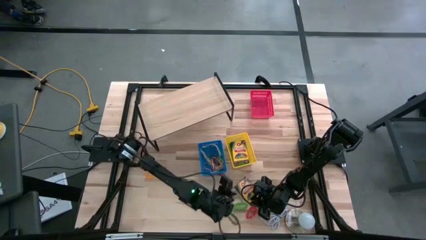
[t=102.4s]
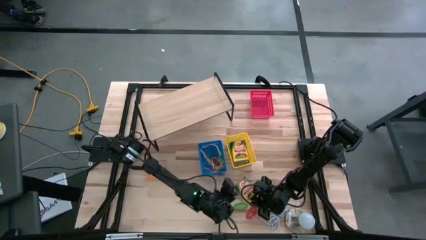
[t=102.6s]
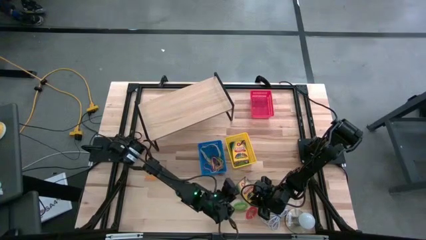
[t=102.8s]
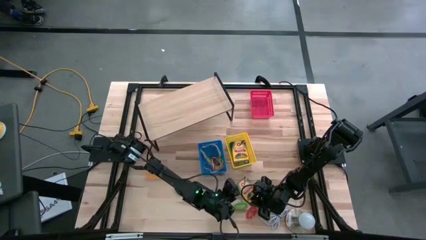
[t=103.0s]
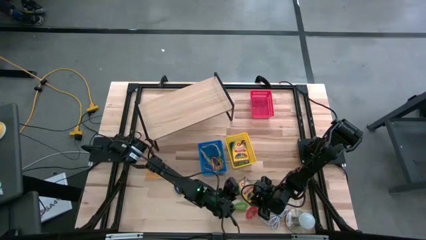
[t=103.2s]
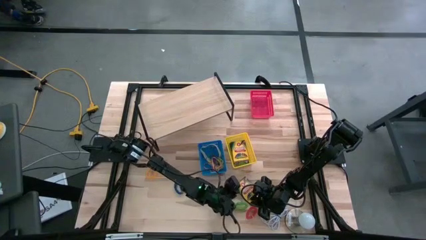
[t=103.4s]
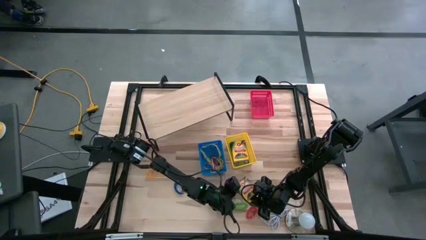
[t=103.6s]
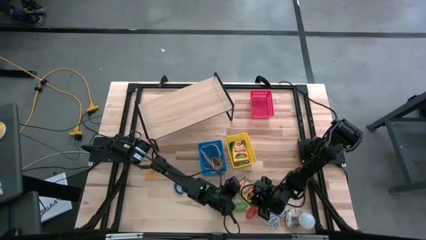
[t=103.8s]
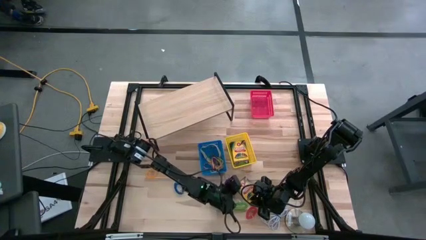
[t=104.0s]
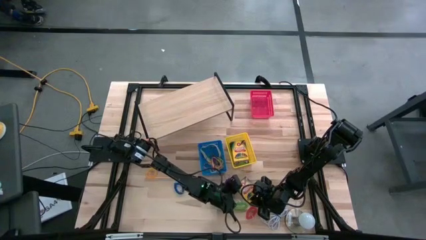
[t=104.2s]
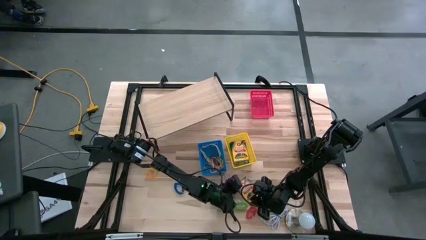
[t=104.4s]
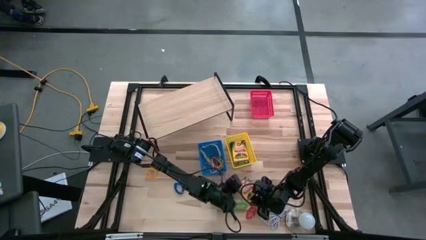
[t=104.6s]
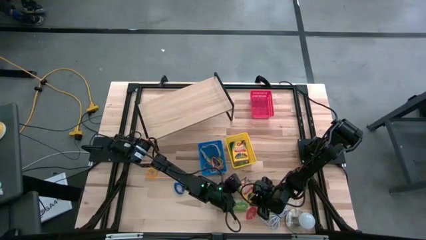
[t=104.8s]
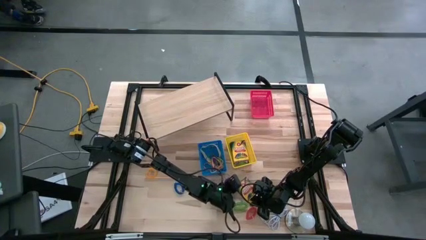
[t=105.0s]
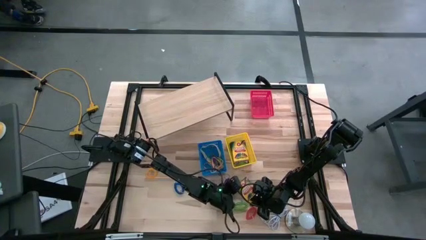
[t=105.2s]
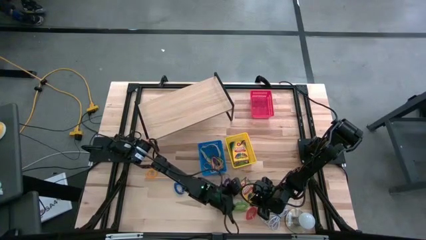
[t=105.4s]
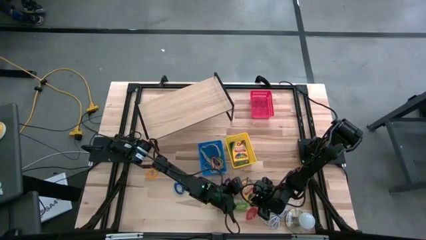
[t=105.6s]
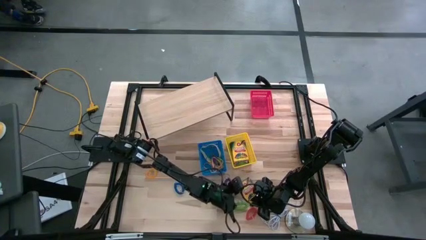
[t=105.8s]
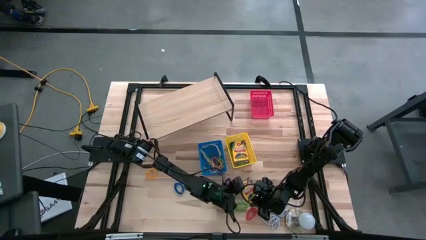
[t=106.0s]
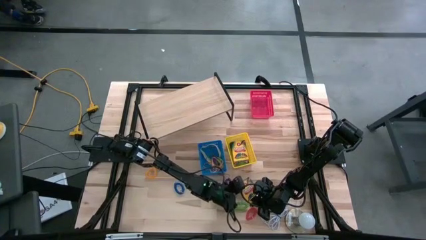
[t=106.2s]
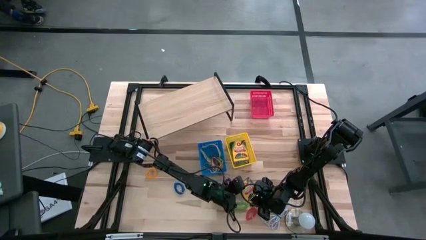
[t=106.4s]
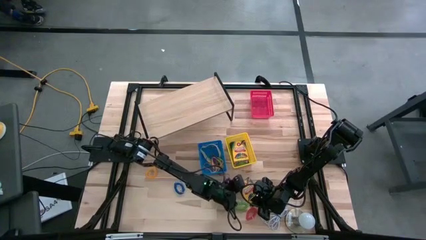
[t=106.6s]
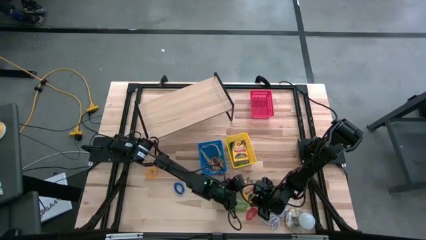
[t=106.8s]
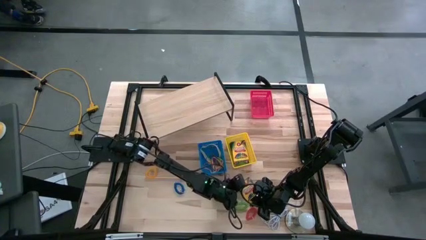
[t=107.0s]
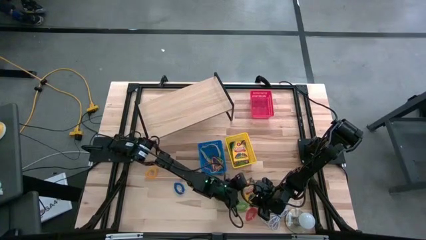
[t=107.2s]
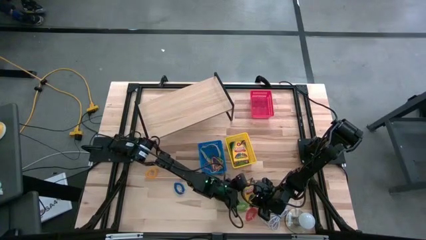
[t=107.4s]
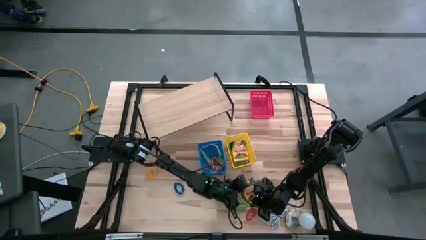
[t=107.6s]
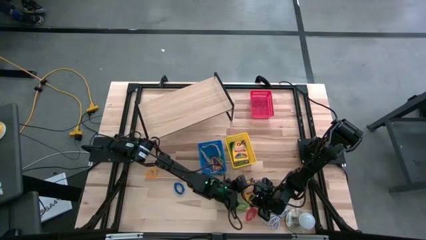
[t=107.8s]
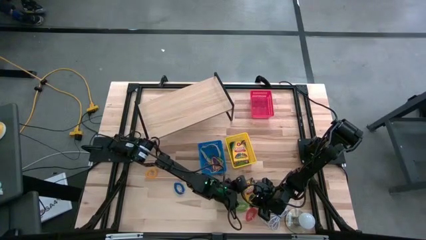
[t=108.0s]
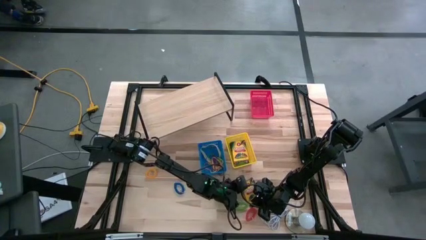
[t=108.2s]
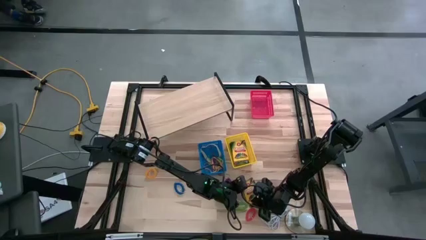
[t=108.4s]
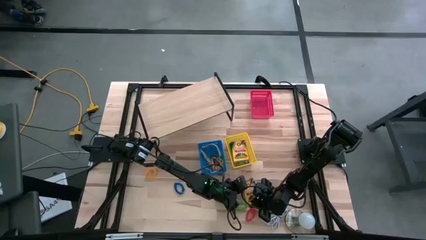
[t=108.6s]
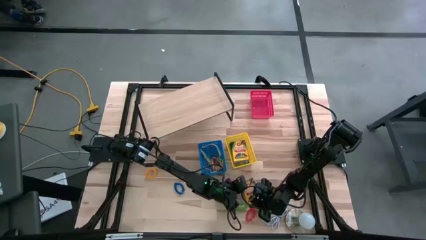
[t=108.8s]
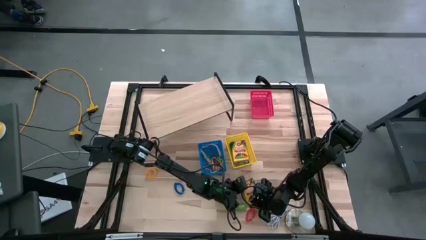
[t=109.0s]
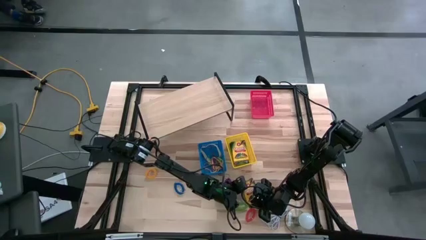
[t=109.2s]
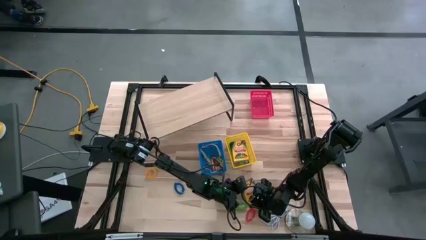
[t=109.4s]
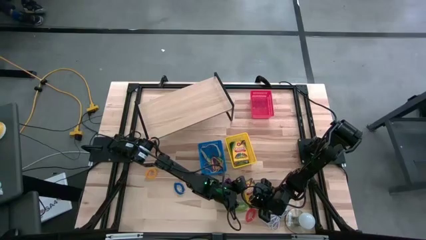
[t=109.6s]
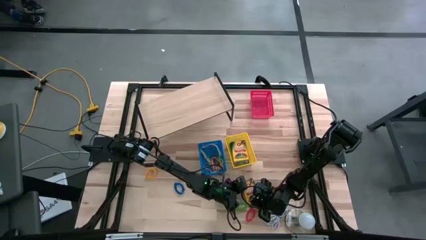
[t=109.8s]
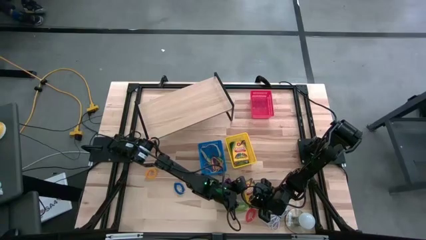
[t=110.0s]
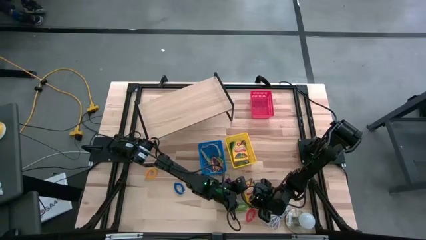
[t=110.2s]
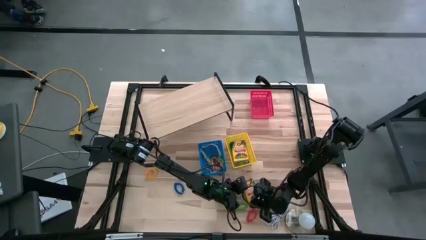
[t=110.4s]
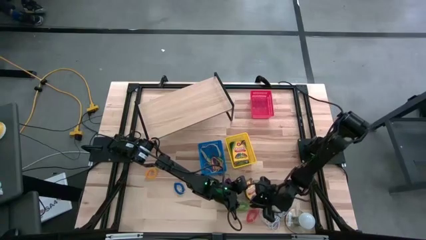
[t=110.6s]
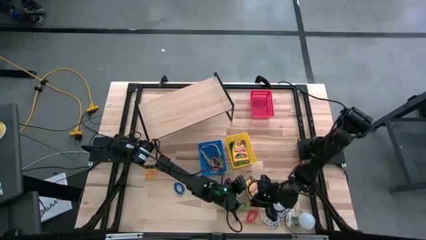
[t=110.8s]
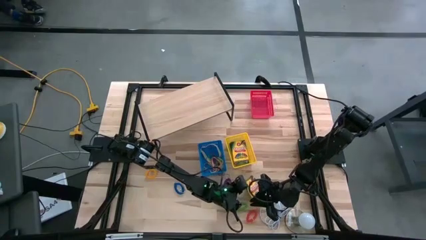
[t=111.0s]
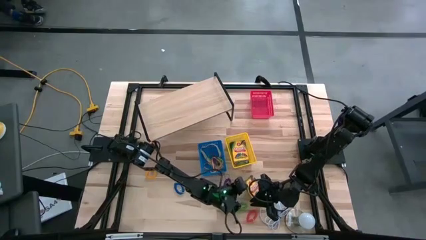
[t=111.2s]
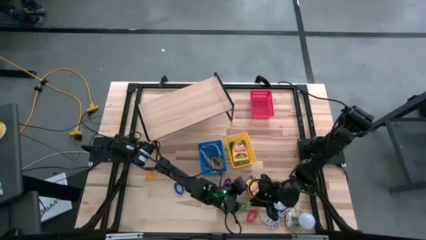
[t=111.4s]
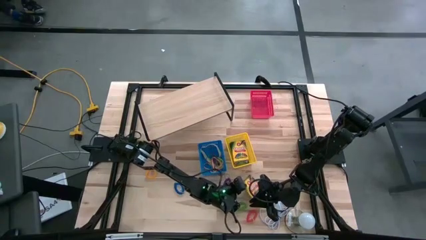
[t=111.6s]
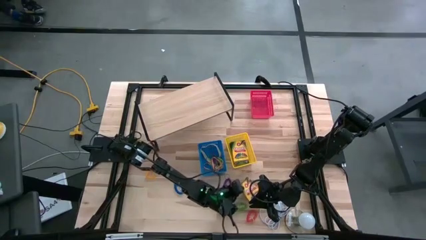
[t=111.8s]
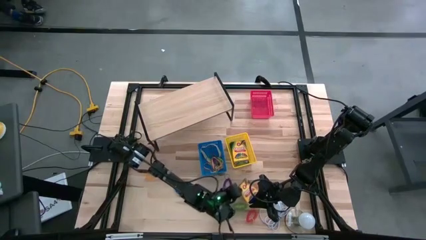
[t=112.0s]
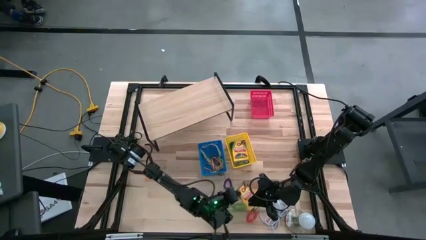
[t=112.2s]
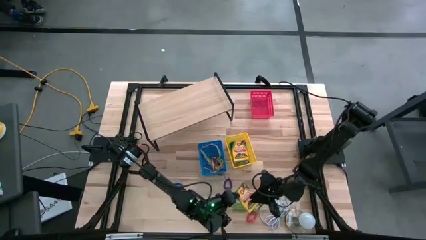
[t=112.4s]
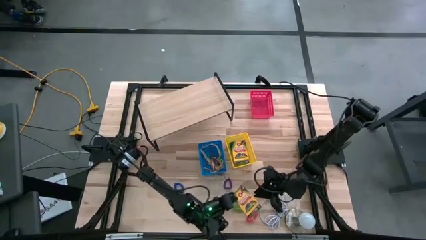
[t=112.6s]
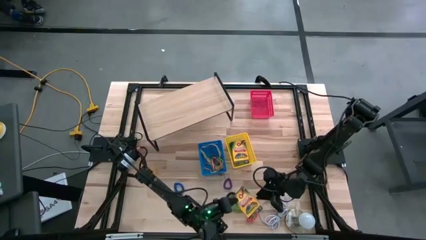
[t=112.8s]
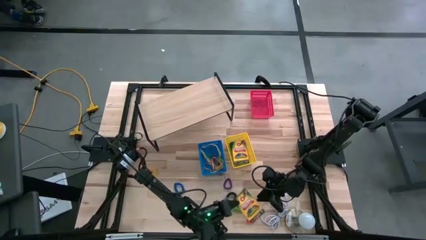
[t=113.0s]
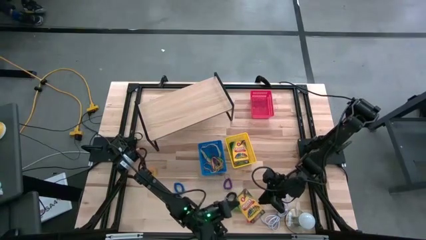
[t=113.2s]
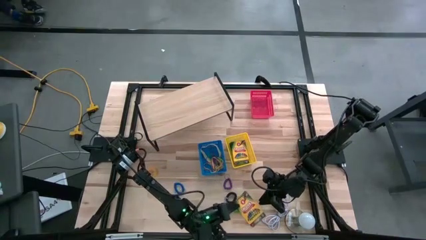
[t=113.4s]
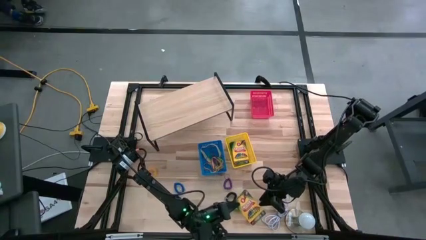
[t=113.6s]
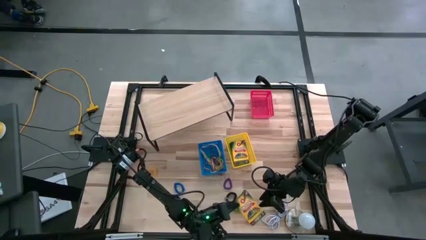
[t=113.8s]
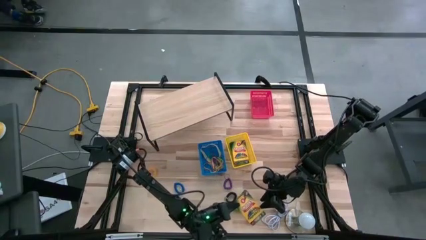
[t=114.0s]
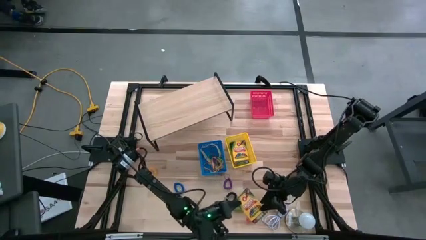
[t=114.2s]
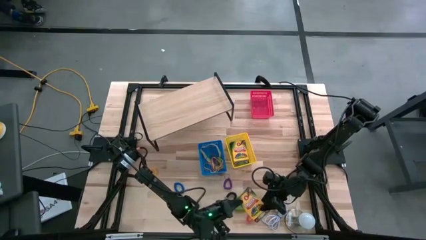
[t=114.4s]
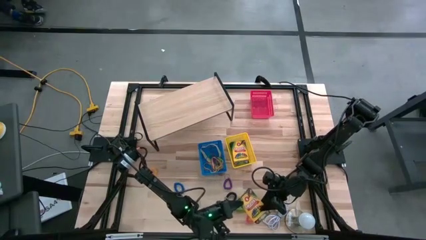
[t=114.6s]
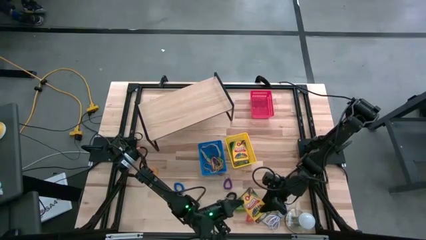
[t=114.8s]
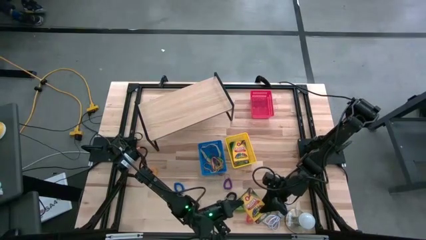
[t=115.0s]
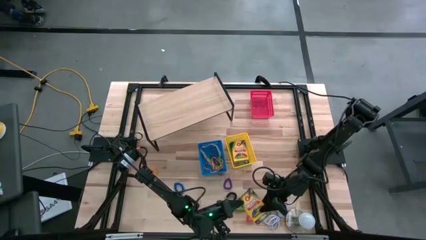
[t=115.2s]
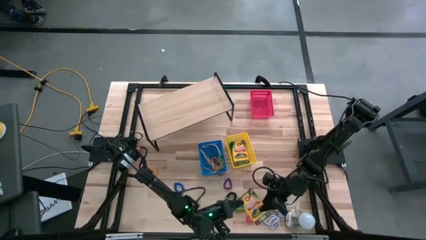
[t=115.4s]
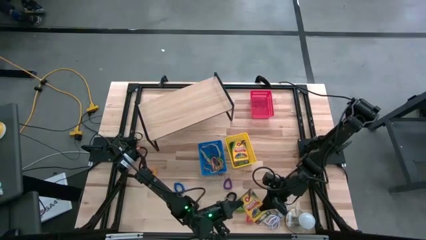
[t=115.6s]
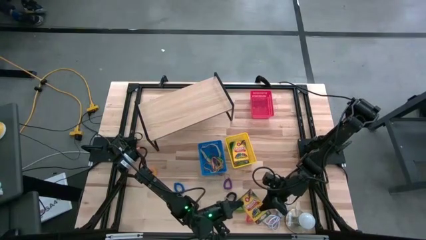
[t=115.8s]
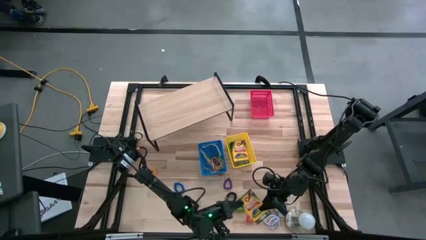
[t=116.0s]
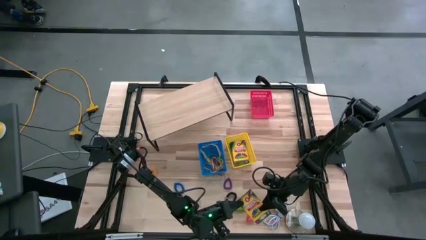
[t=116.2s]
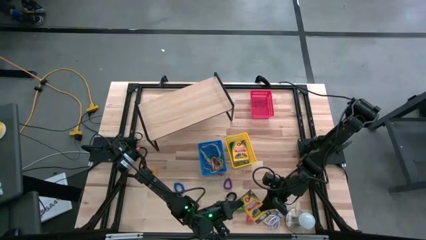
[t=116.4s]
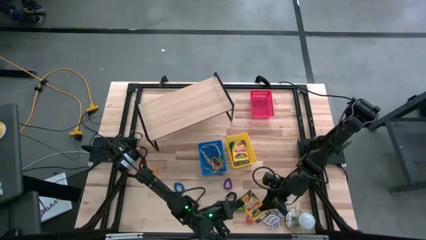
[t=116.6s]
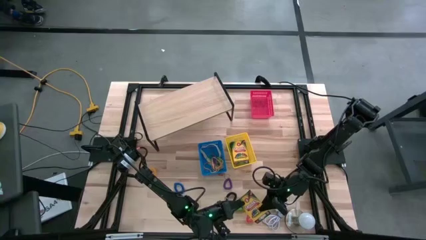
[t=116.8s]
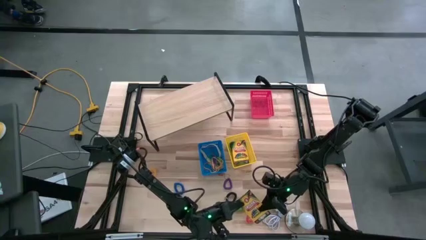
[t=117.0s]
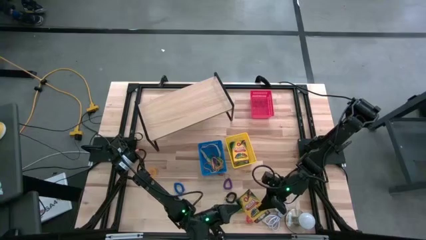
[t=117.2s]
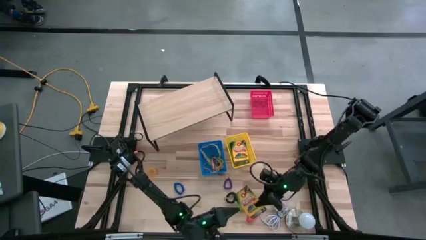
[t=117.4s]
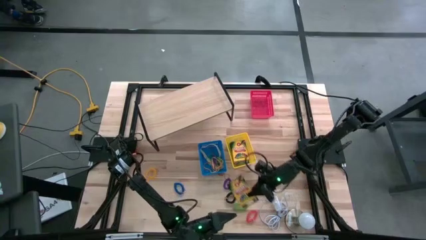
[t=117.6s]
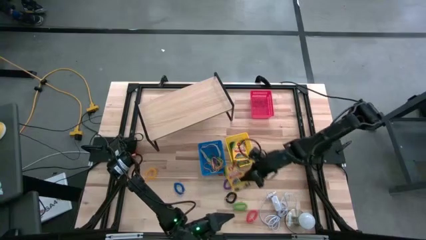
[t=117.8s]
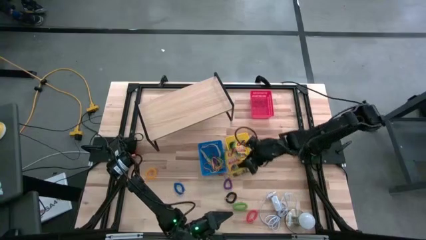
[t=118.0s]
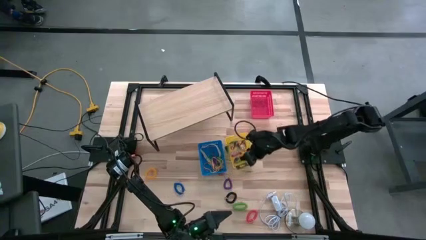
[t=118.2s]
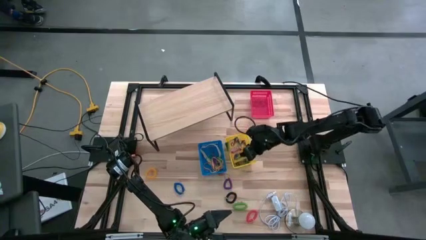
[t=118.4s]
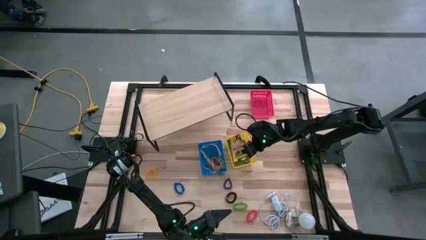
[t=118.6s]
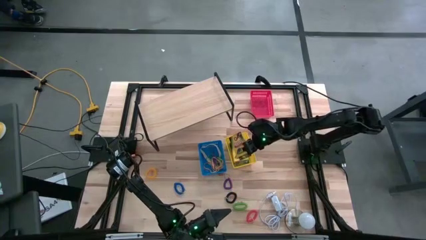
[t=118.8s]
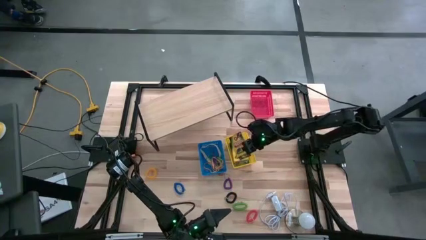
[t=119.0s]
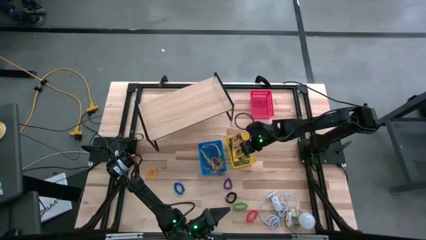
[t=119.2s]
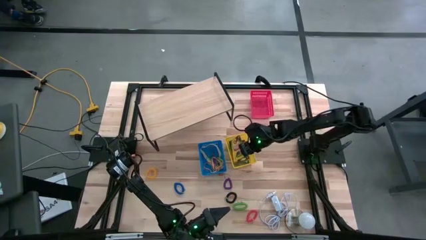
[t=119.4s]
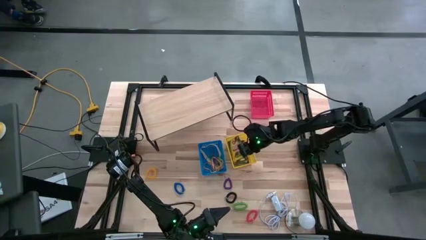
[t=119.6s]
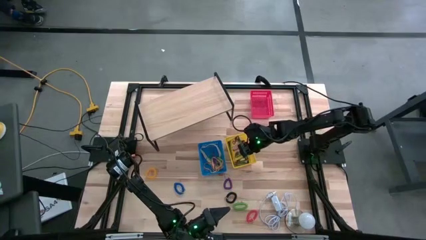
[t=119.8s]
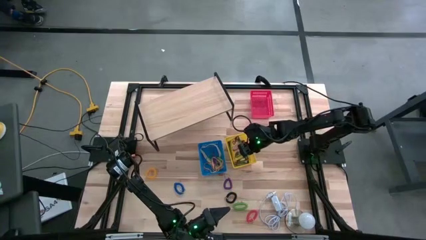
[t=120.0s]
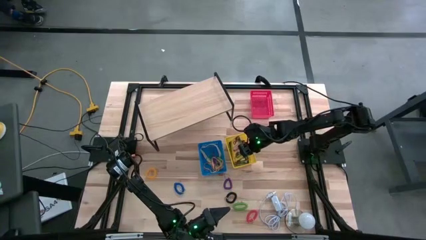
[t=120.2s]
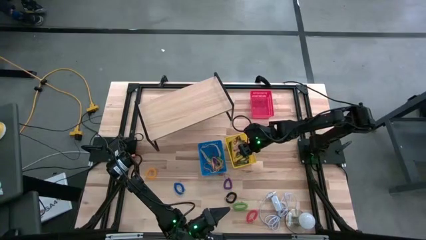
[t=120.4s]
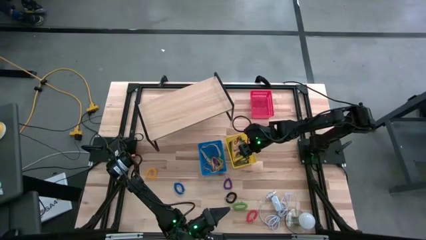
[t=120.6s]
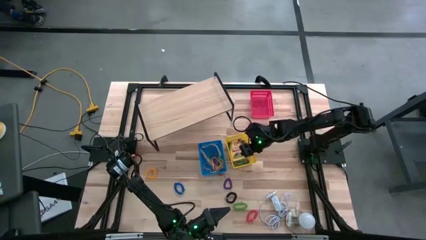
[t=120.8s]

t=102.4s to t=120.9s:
Task: Pick & Place Office Desk Supplies
Put the yellow crayon box into the yellow bin
